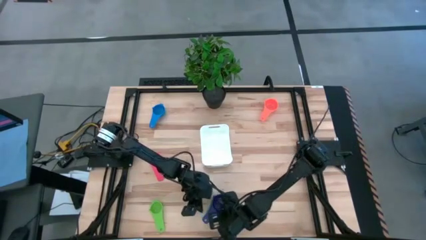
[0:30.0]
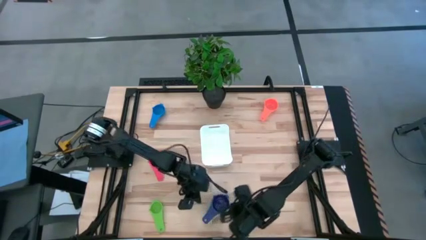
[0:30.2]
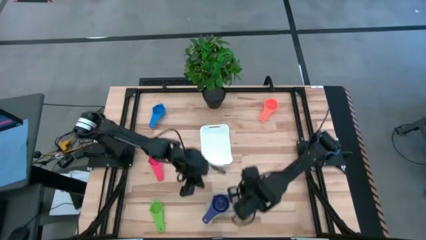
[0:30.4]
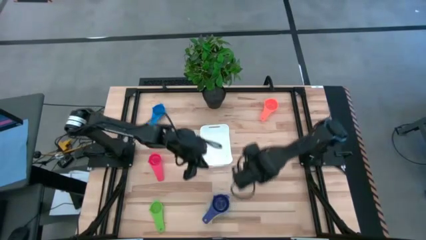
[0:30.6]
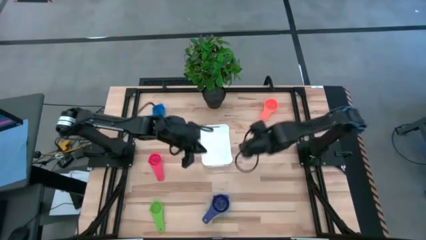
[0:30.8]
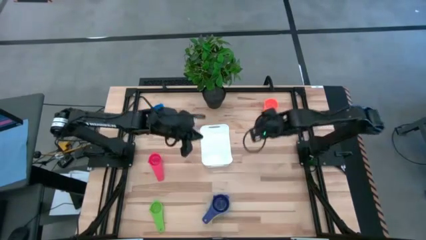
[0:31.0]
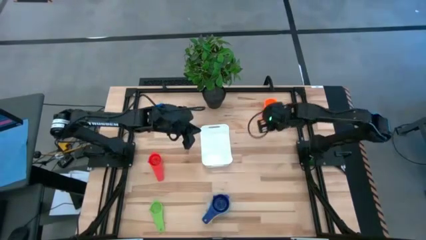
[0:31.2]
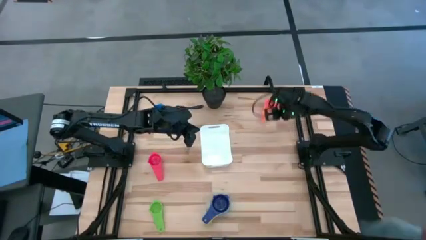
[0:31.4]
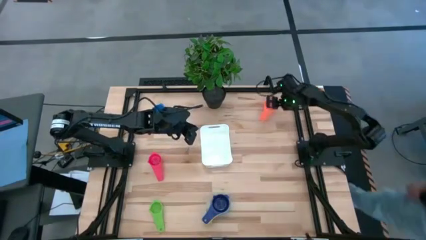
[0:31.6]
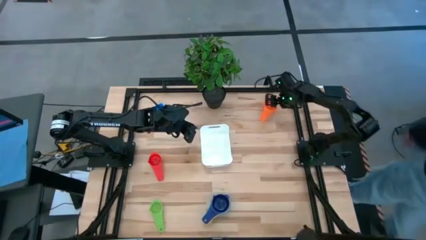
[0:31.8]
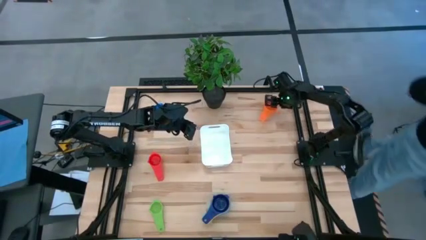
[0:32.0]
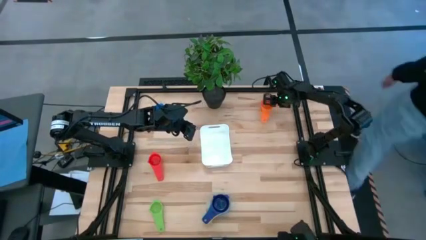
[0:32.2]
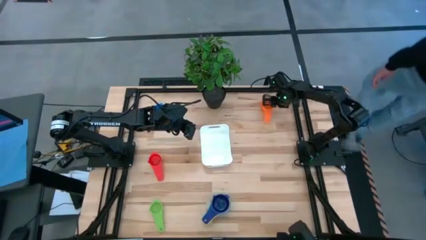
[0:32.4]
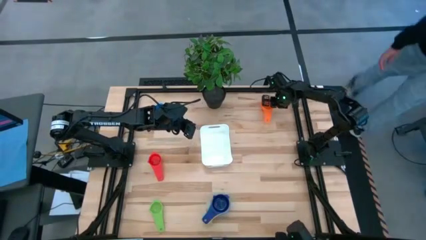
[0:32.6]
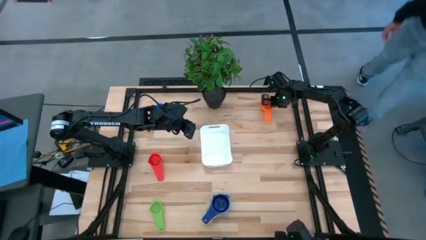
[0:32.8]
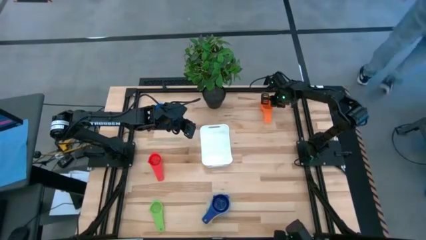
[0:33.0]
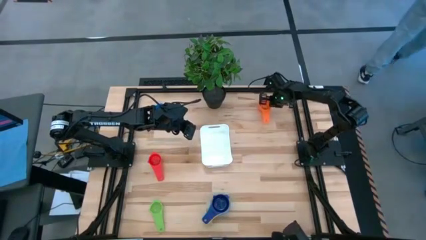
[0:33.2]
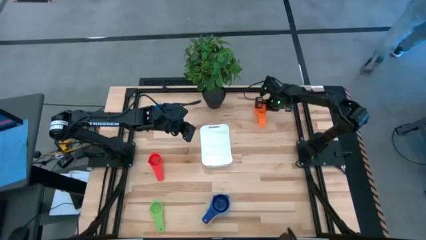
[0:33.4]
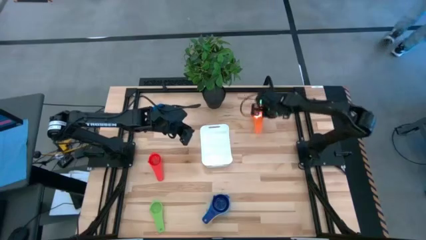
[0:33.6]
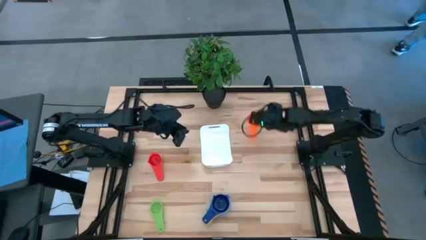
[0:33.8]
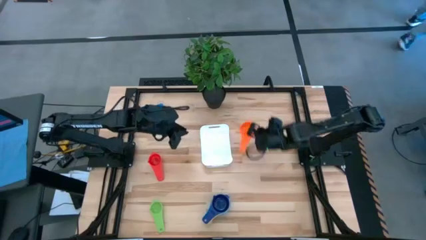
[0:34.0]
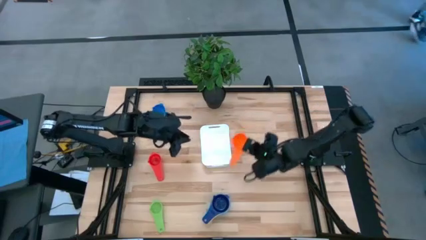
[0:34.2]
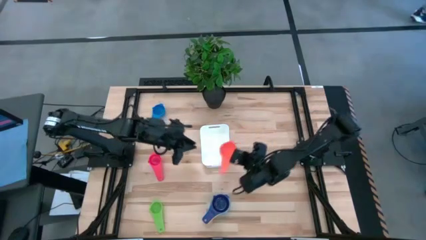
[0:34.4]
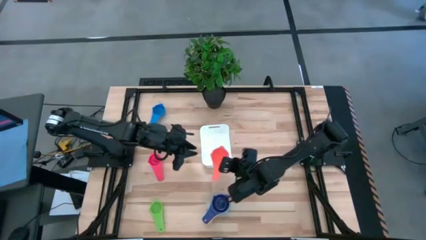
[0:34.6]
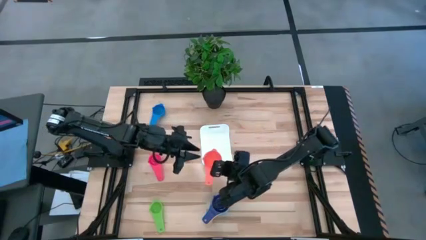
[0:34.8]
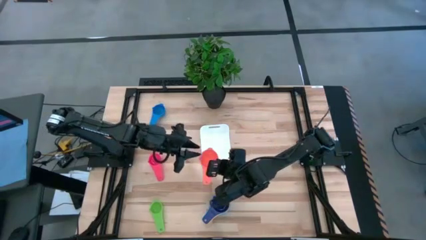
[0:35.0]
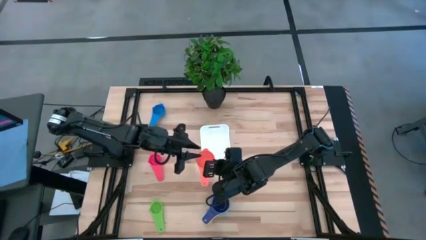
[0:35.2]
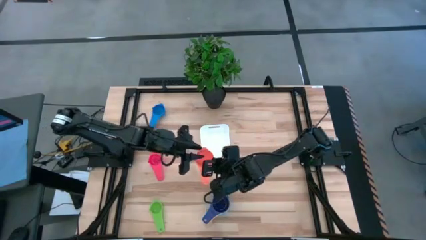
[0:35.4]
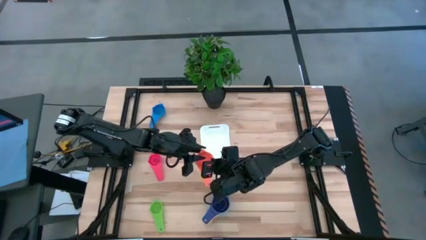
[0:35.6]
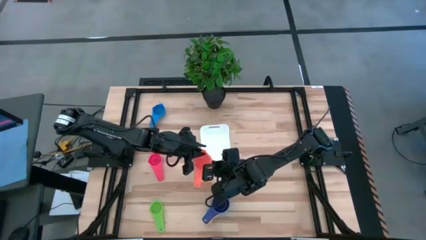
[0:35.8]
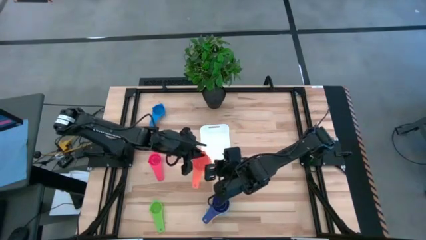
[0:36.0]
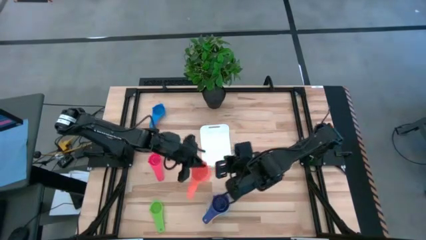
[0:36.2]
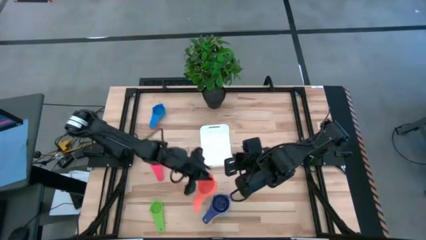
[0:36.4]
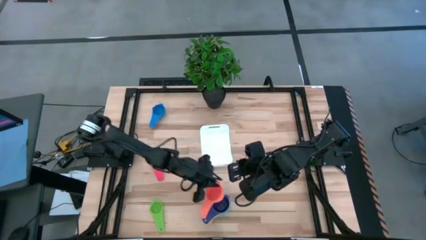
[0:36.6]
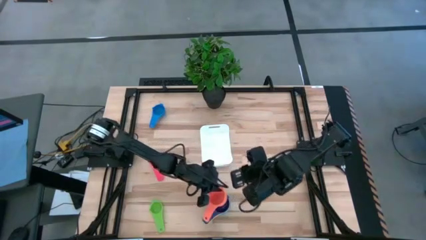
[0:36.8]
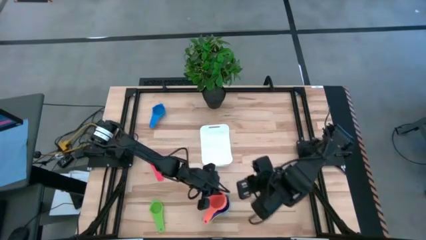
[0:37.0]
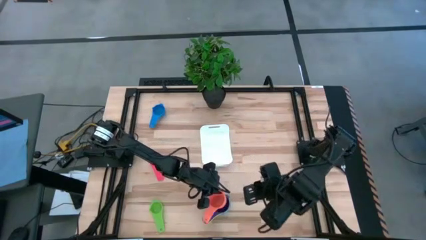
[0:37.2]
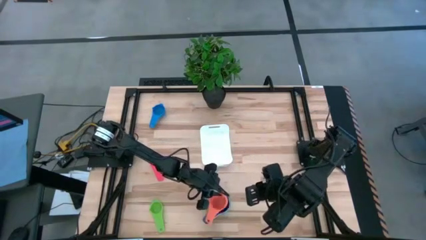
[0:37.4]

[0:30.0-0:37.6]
Task: Nest measuring cups in basket
Stack the orange measuring cup on top of the violet measuring cup

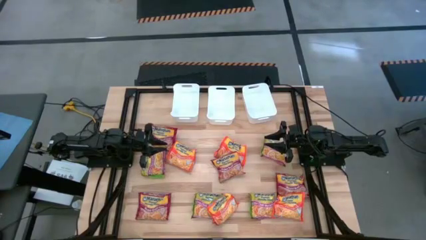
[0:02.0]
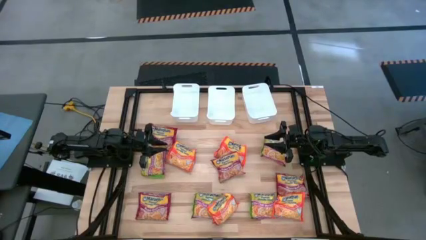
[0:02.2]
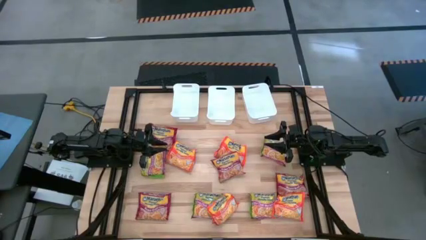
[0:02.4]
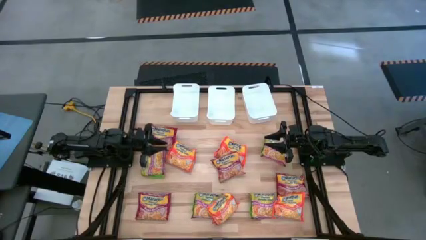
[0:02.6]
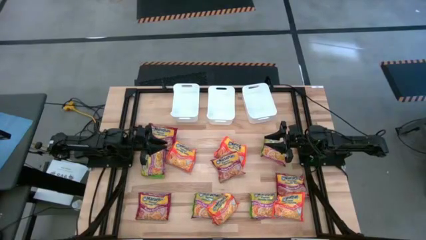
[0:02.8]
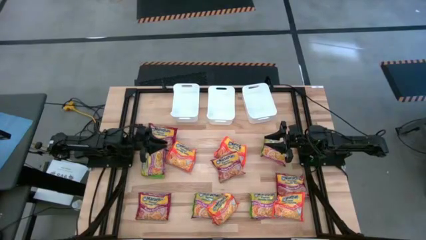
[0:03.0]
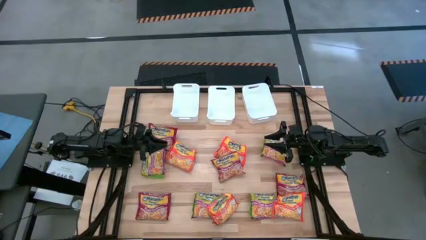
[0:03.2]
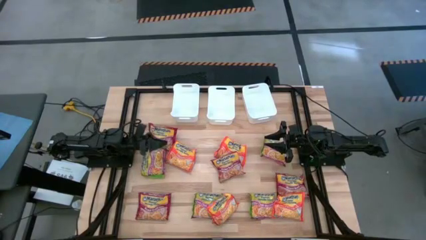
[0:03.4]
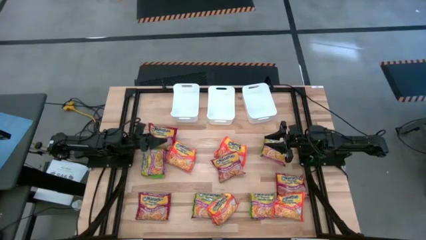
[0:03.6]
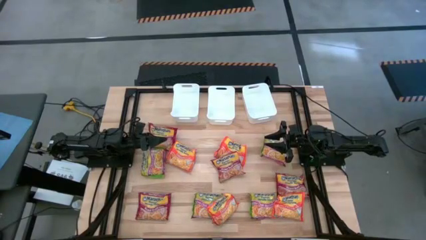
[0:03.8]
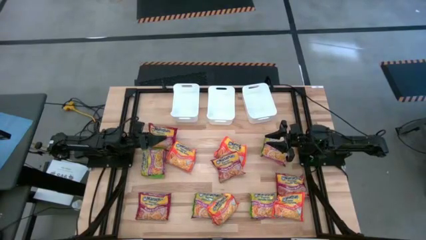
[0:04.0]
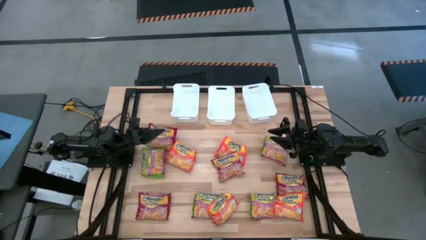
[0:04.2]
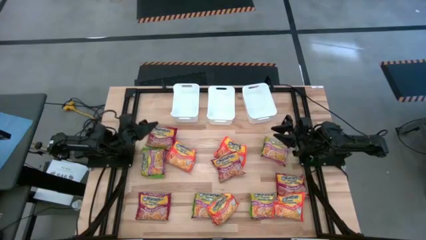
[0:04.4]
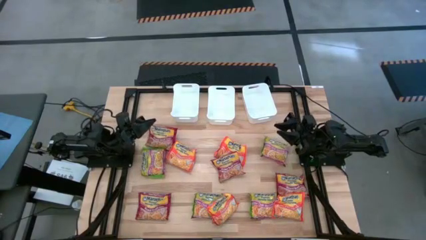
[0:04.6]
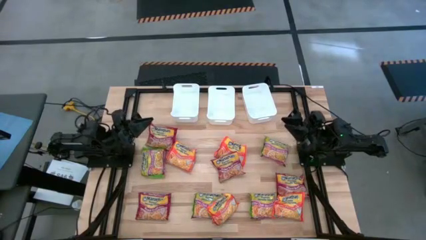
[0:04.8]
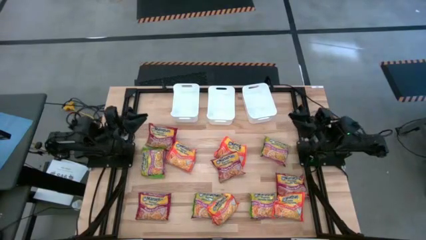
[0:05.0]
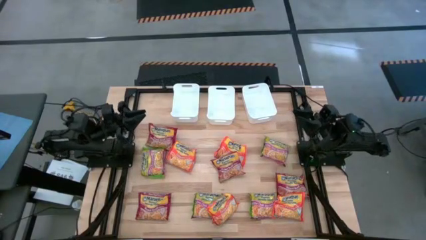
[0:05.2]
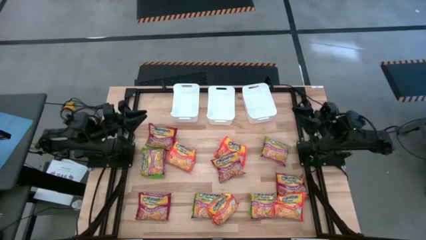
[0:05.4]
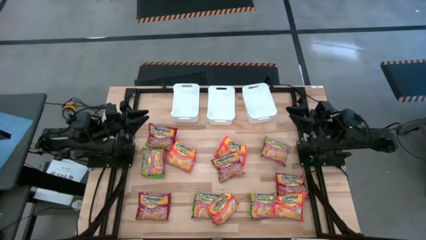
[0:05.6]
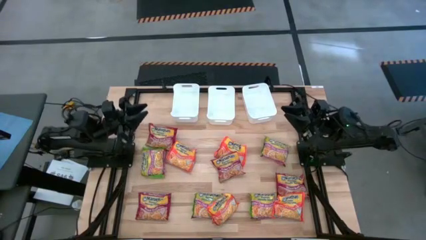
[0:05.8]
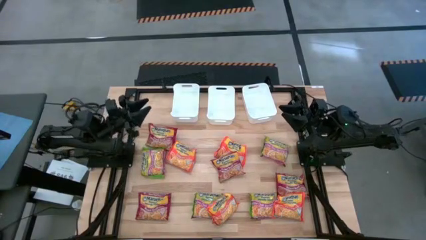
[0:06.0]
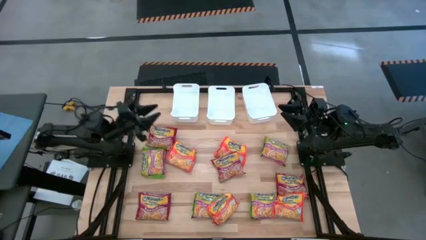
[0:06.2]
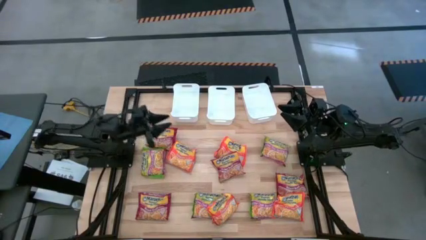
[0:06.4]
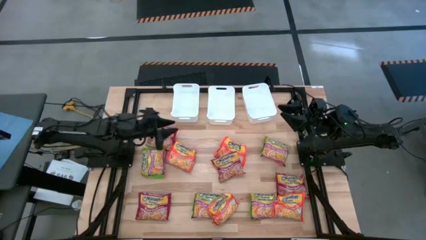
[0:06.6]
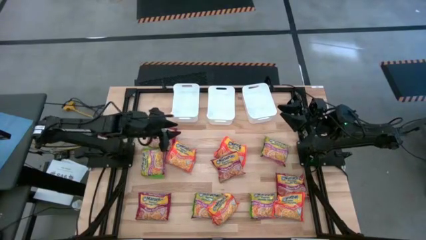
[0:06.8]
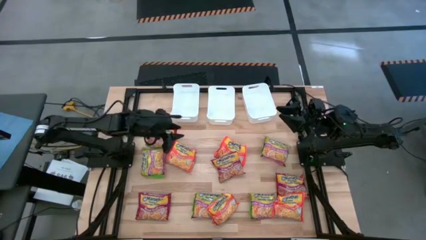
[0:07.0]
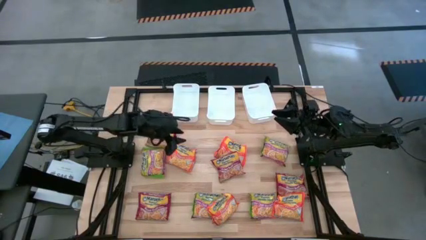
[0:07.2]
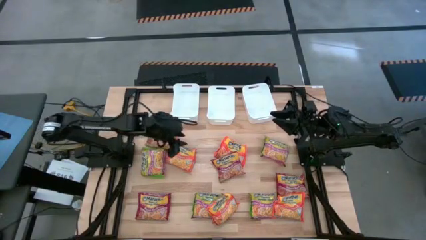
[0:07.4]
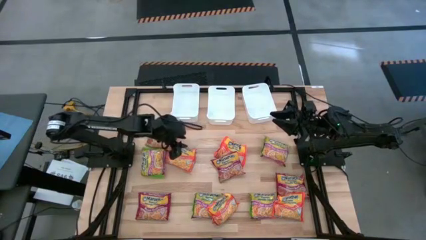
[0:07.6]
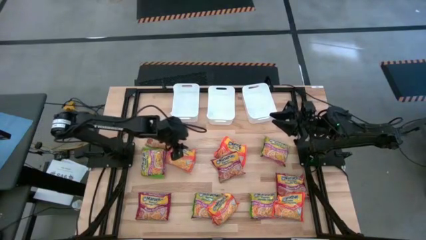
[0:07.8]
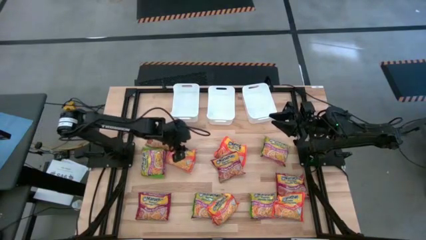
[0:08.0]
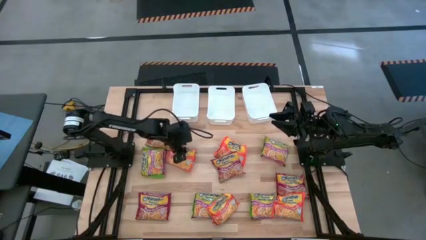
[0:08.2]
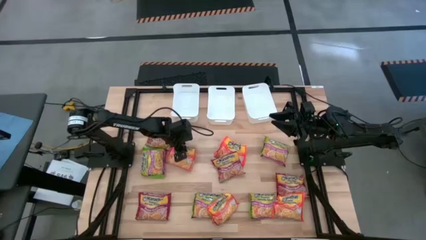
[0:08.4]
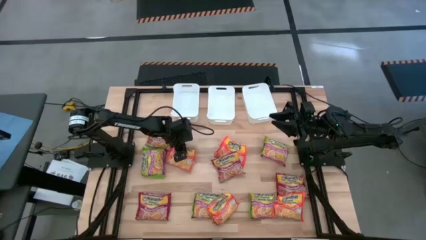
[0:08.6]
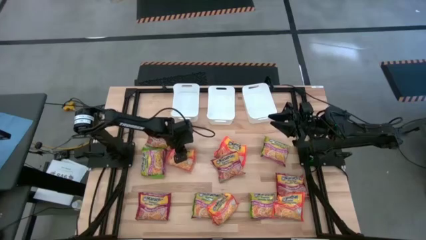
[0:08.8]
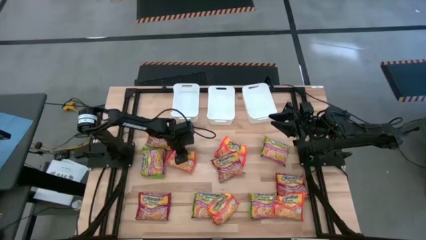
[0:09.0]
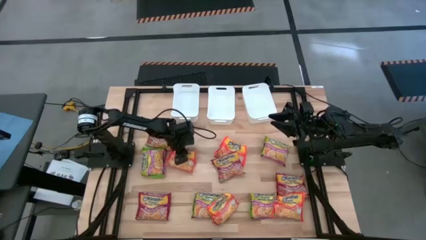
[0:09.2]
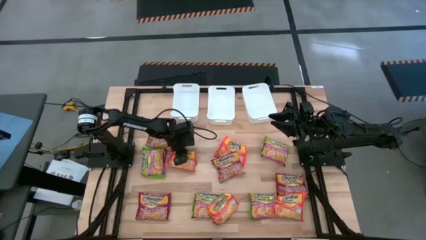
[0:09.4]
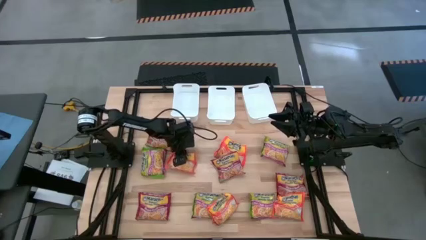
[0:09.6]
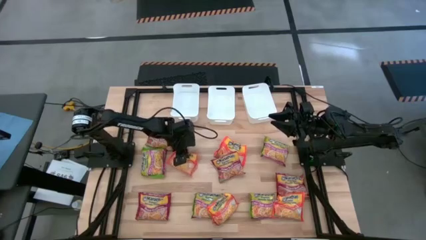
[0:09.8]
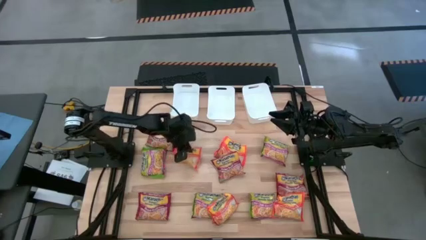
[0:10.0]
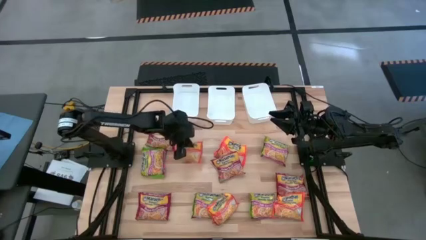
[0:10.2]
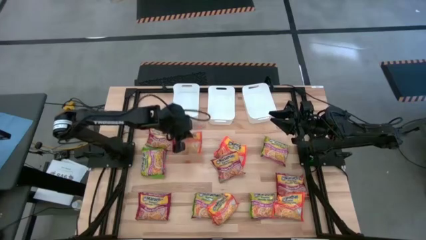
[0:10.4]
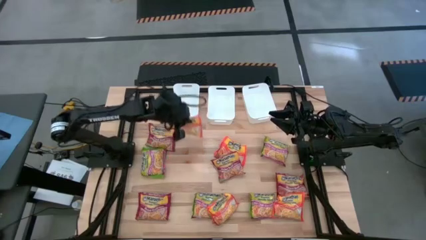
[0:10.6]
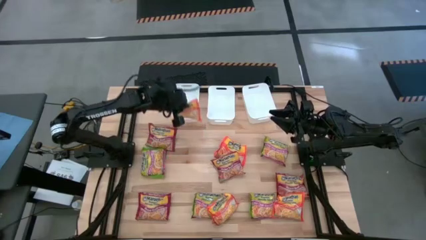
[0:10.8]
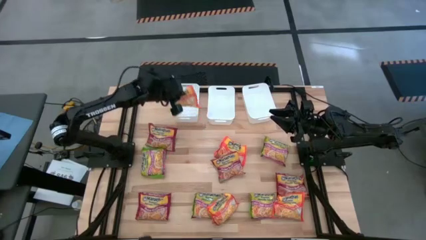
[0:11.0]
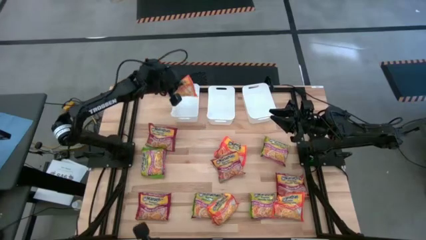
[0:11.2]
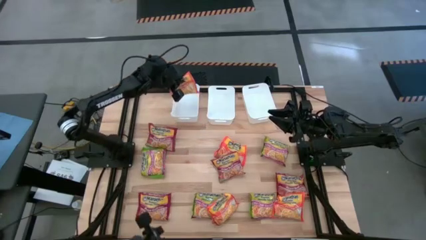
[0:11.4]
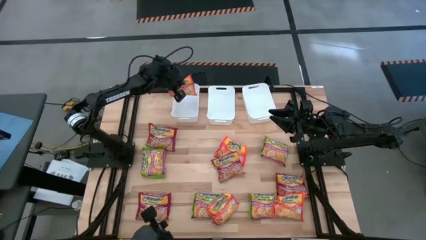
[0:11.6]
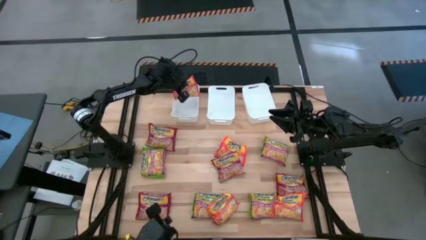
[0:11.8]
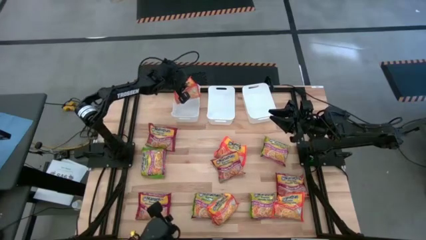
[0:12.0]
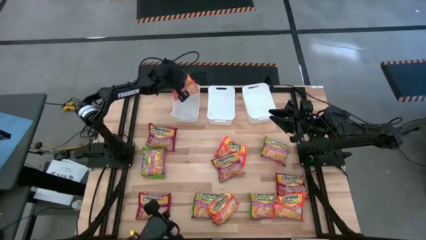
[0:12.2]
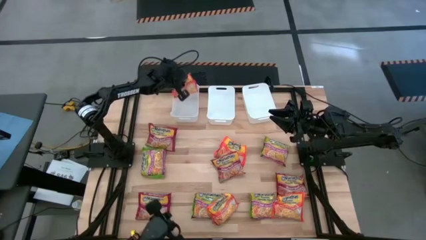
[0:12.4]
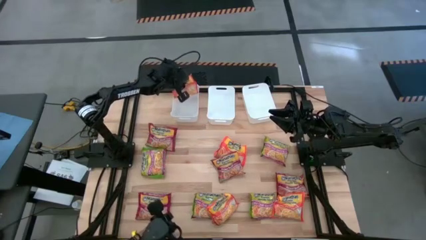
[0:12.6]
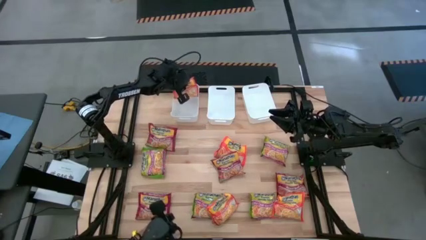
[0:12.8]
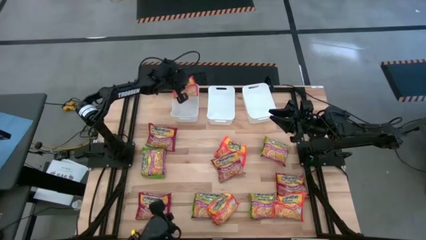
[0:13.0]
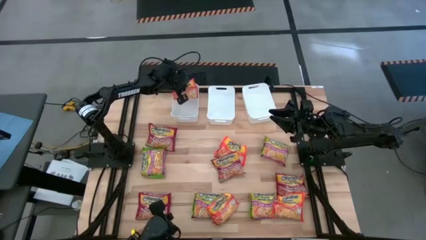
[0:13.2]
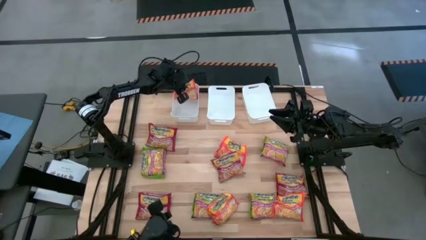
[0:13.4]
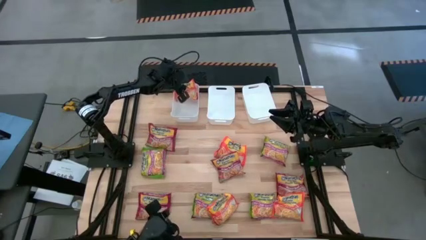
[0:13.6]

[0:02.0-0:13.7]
Task: Sort Maruchan noodles
Put the orange noodle pack into the left white bin
